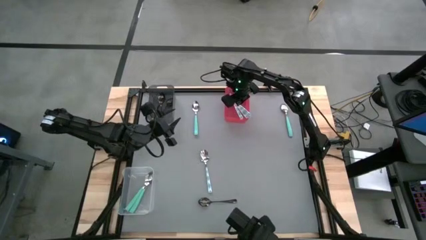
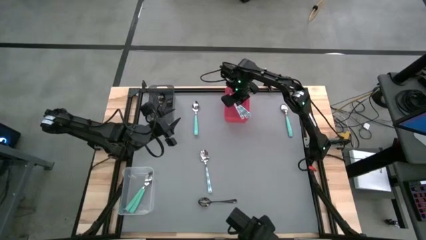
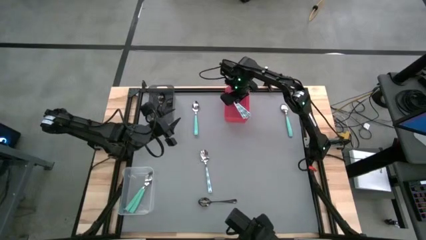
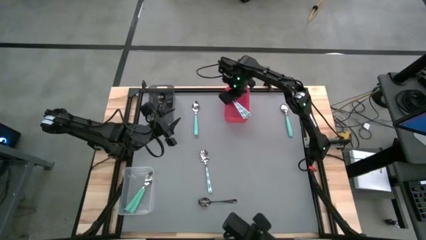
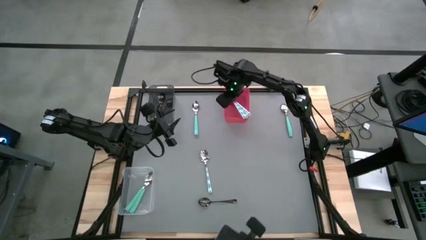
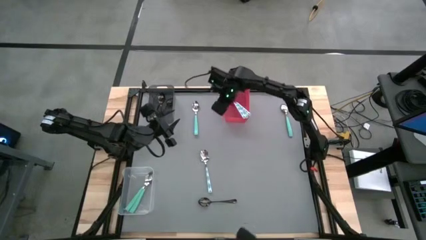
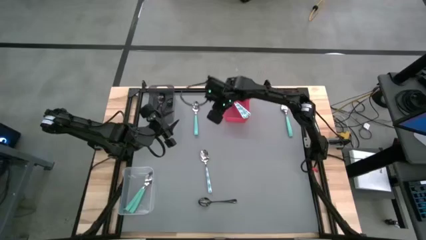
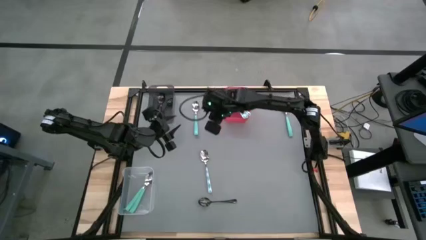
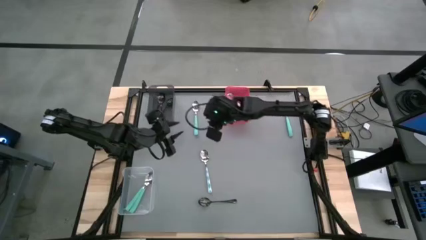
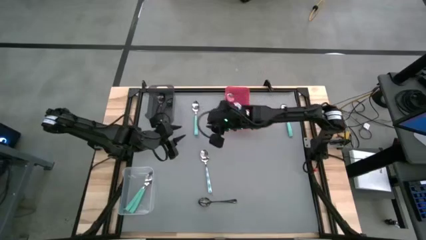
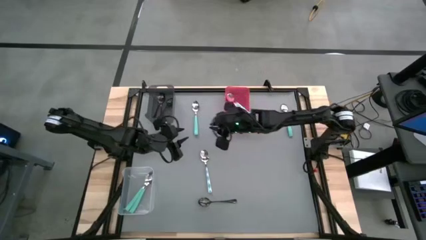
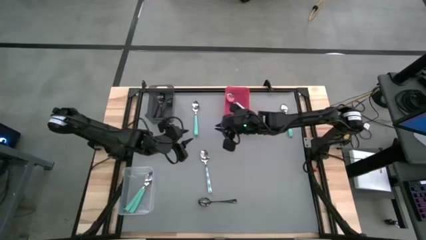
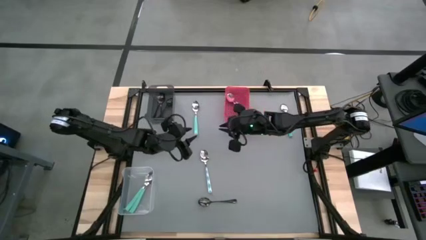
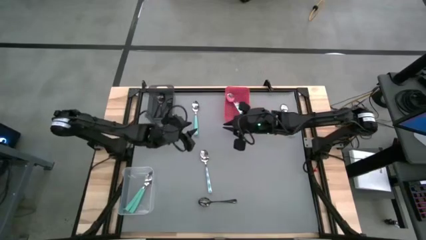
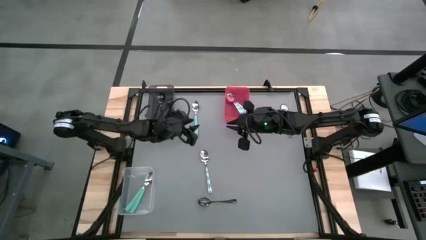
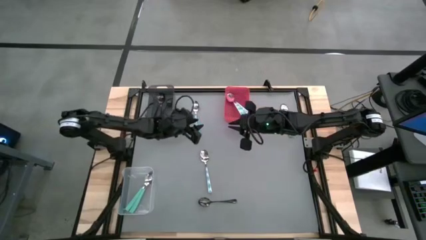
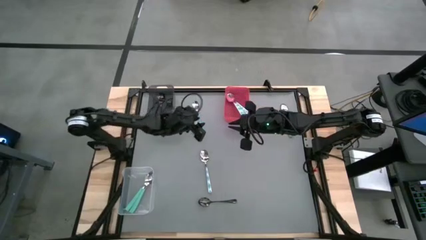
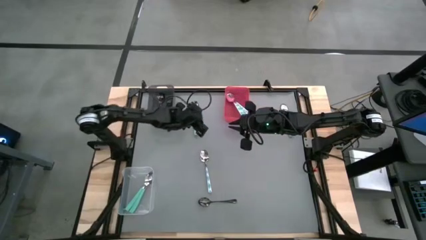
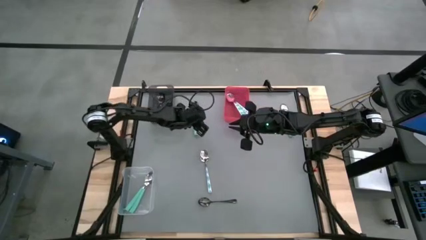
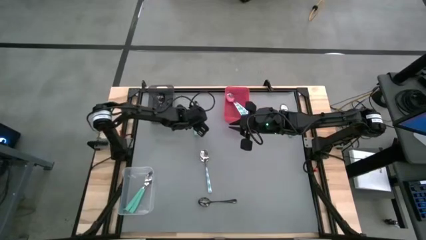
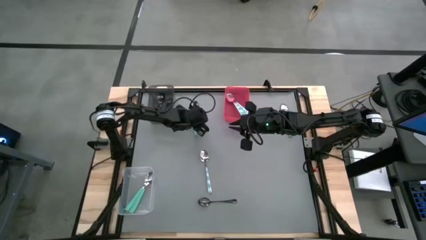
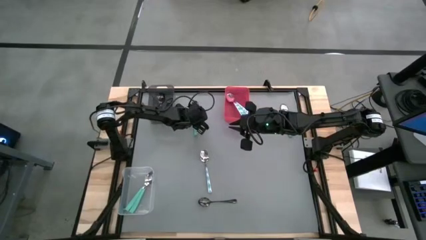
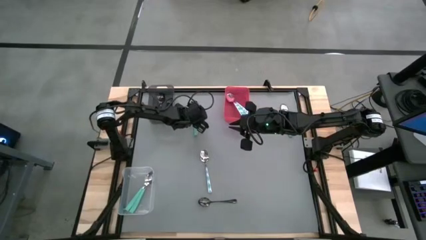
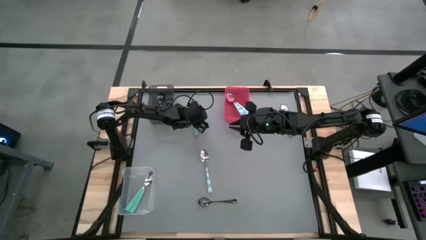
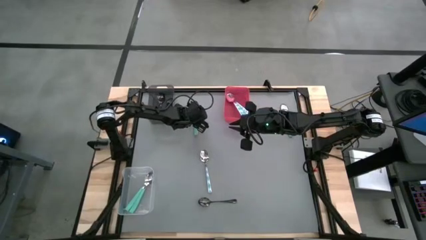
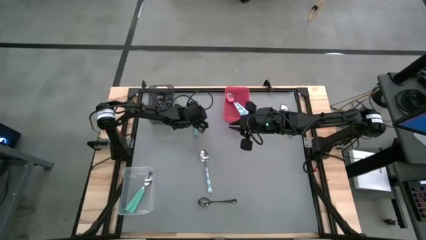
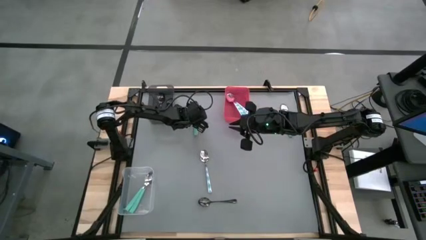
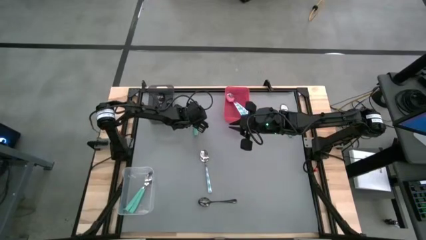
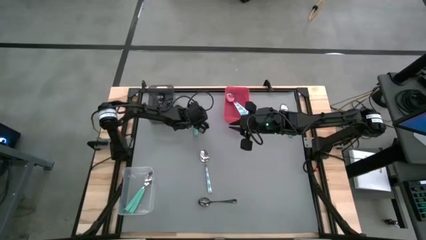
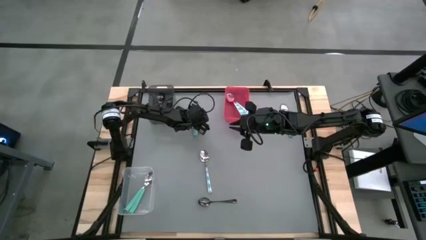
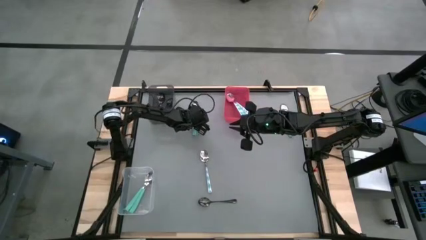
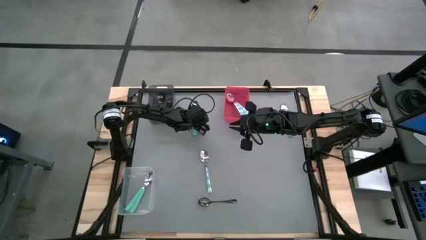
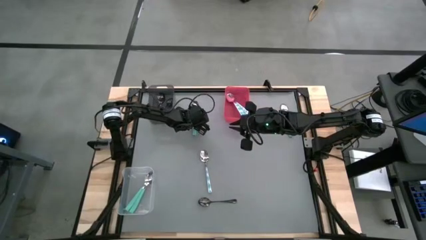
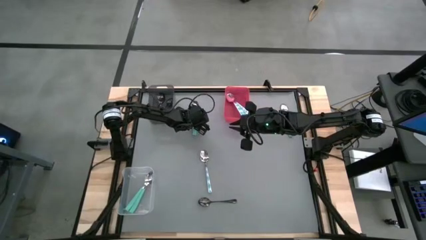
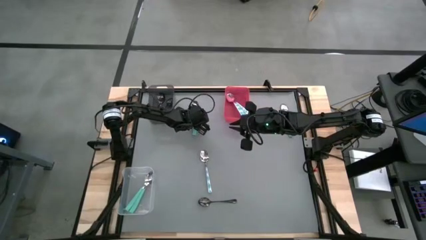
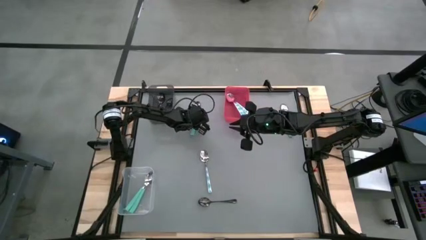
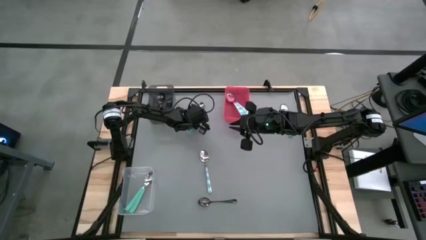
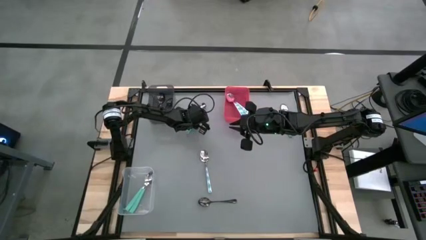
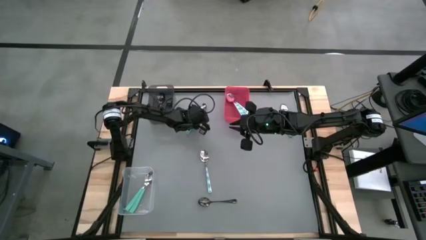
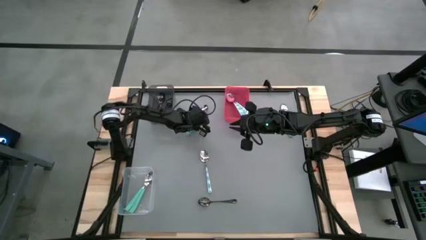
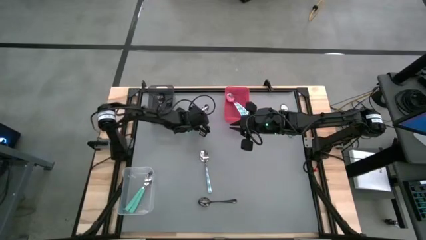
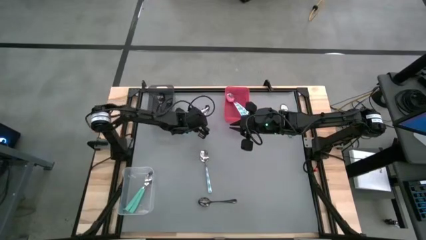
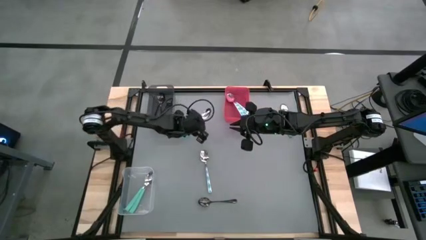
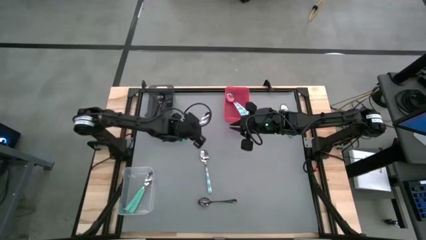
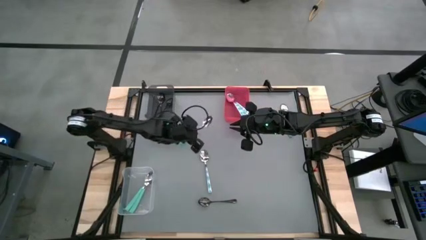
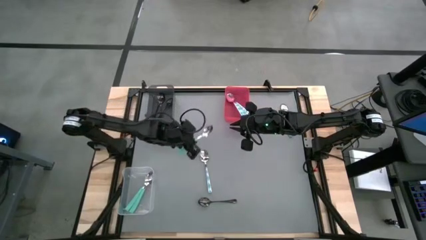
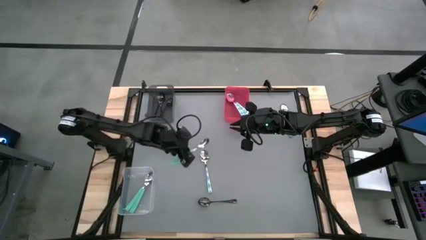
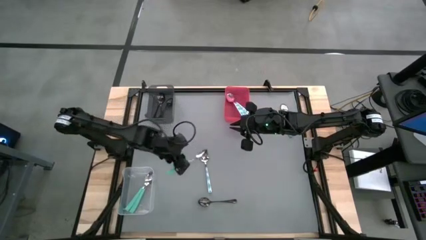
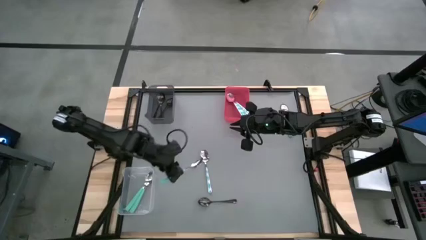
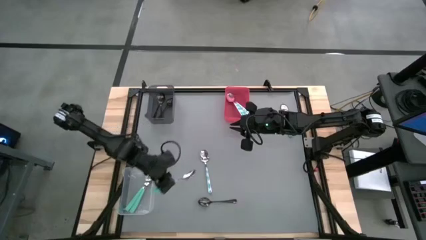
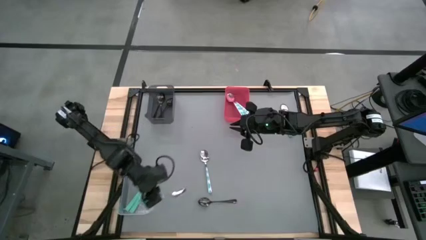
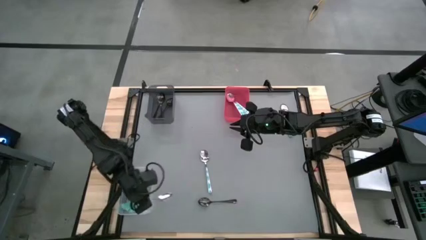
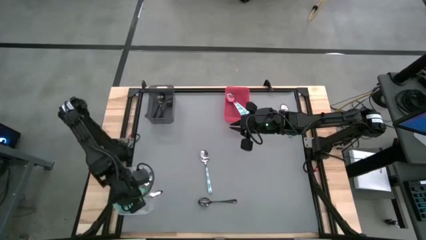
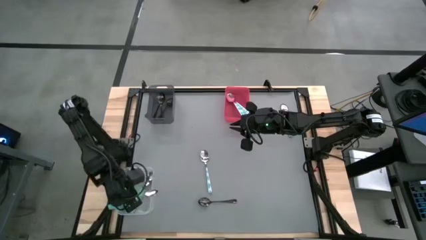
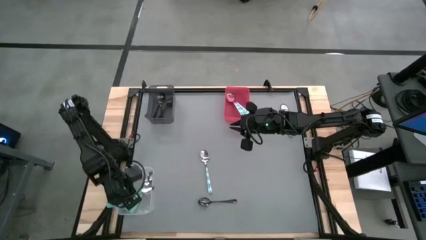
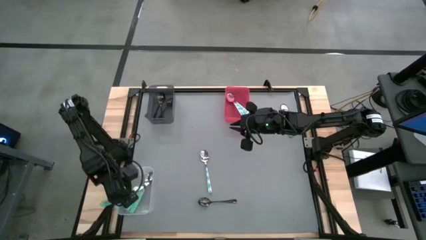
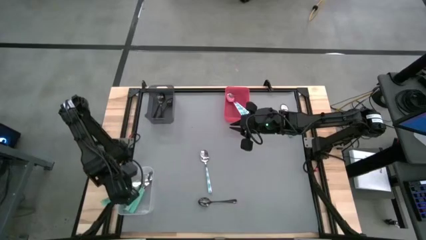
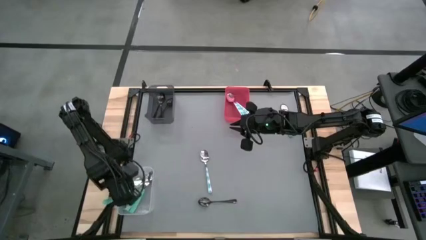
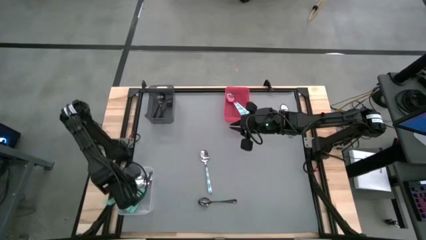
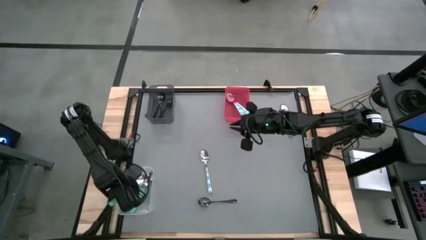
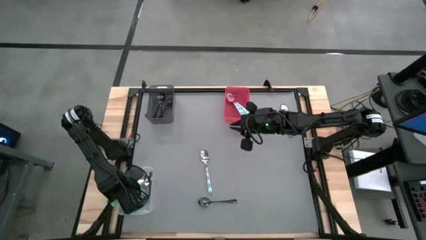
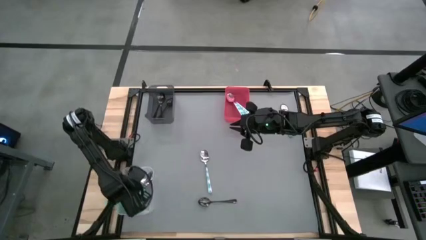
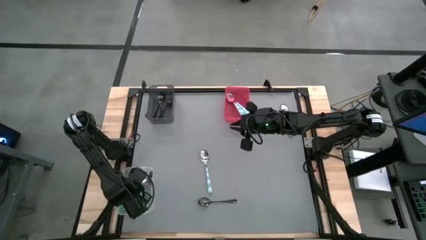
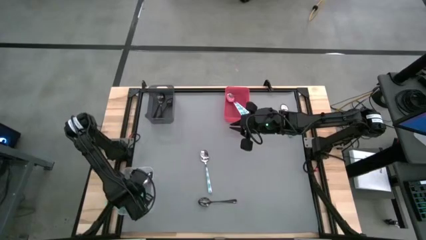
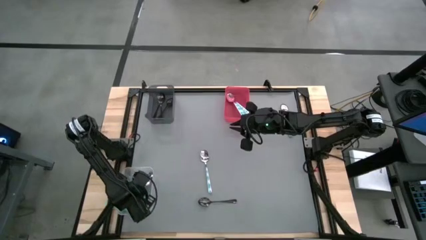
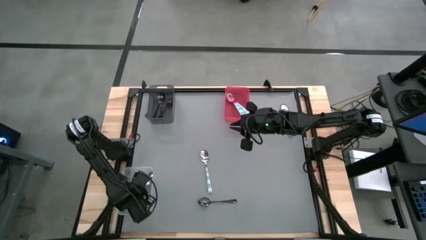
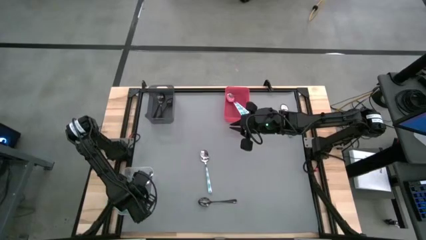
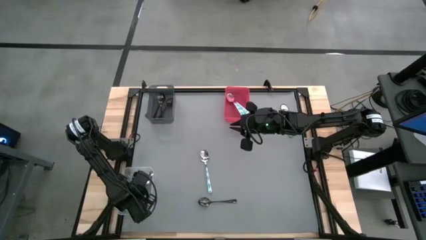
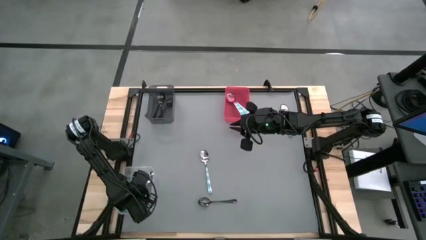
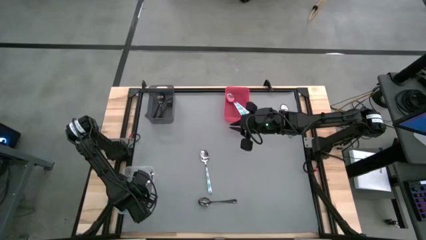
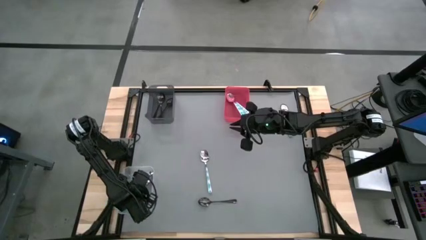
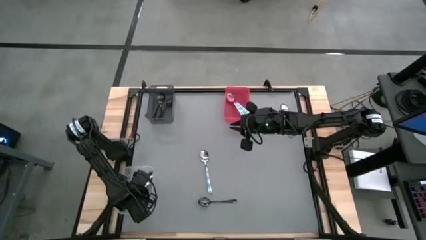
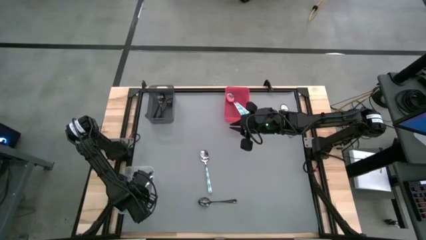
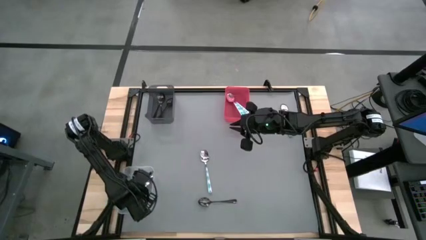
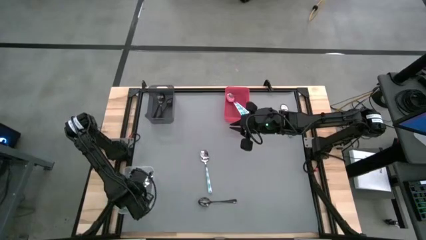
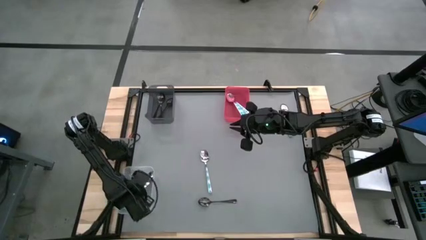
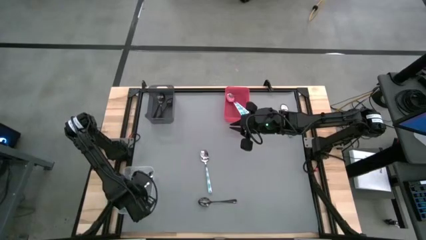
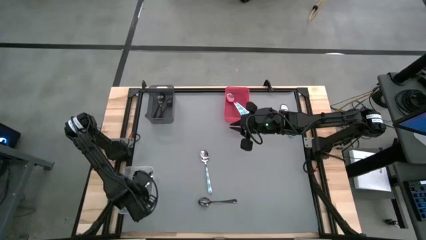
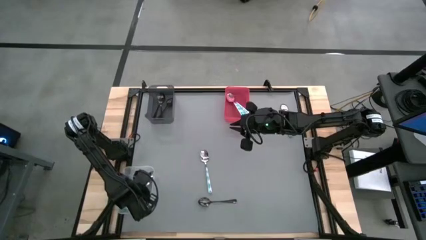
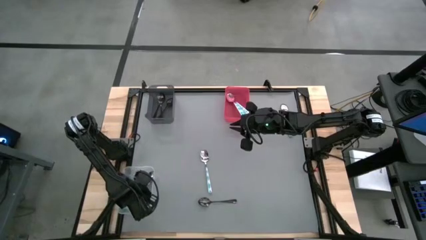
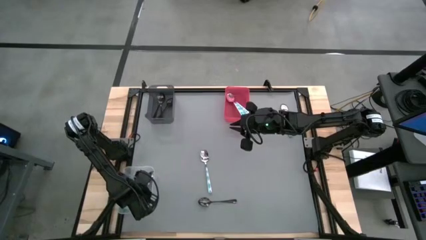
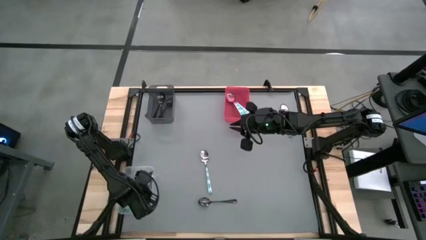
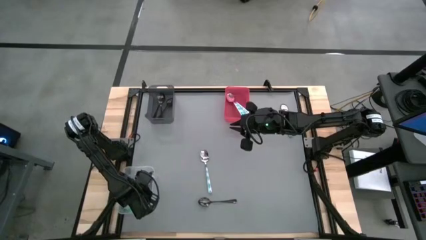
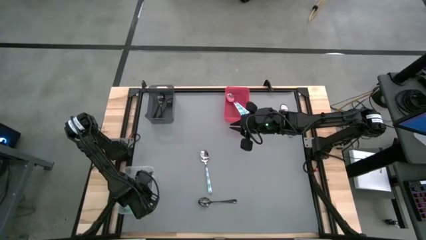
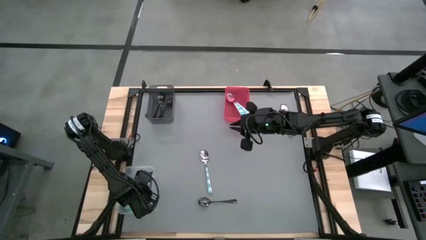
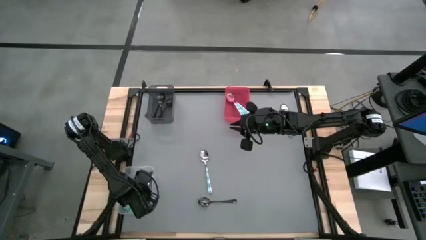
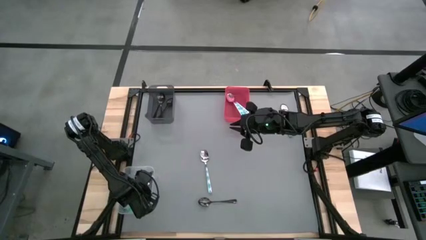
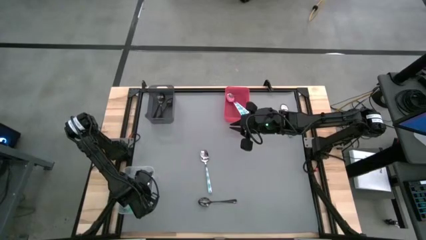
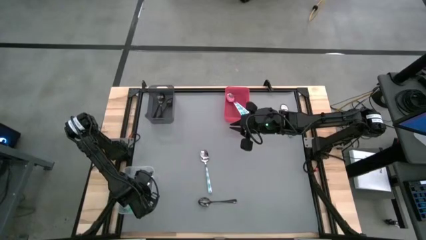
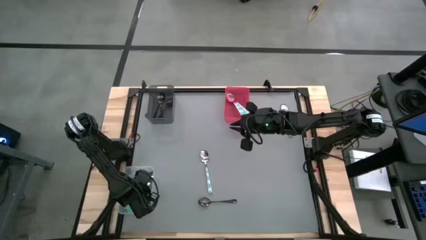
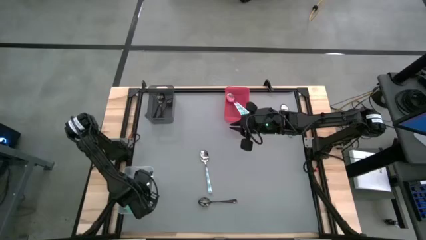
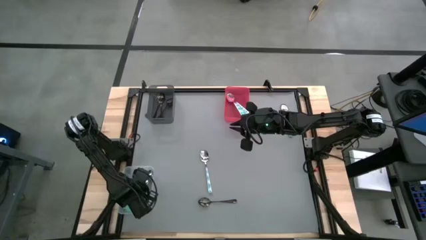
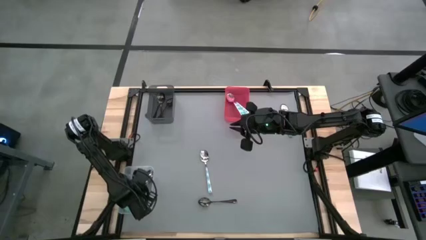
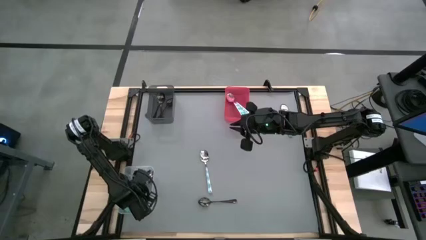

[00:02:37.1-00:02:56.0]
Task: Sort silverware by color (type)
Put the green spoon into the transparent bin
